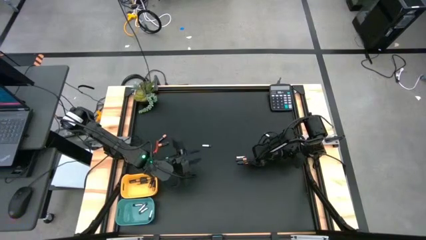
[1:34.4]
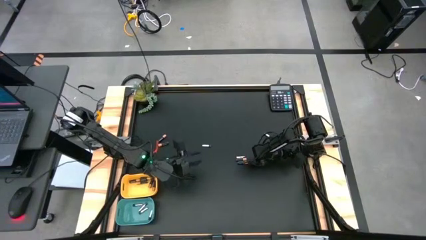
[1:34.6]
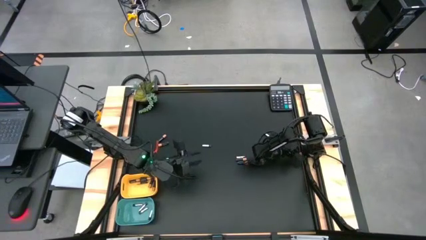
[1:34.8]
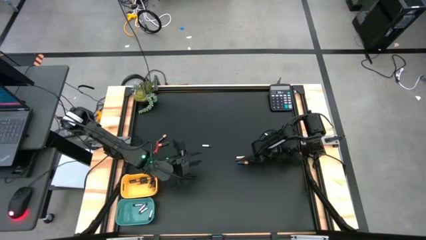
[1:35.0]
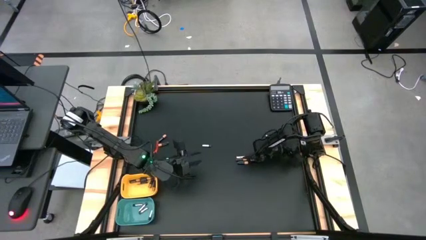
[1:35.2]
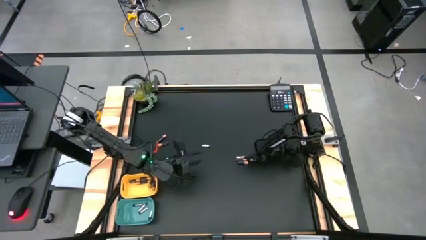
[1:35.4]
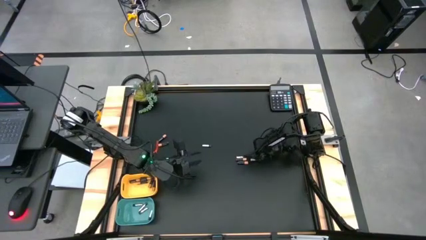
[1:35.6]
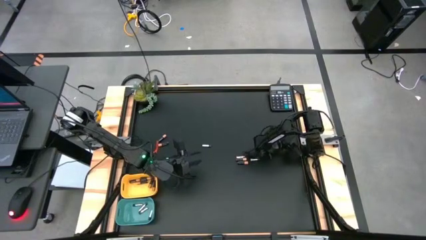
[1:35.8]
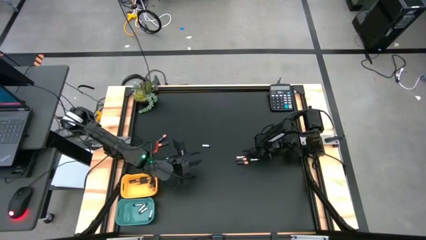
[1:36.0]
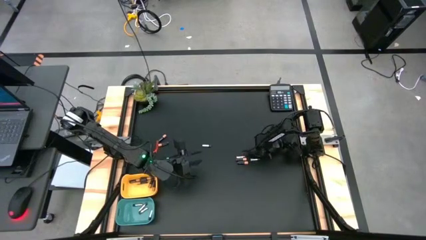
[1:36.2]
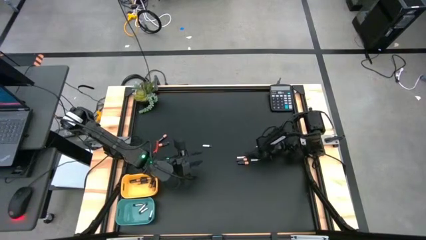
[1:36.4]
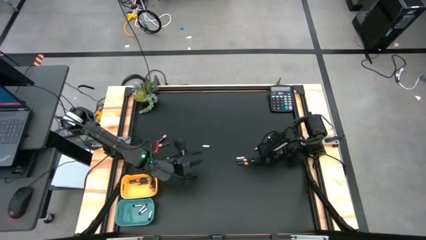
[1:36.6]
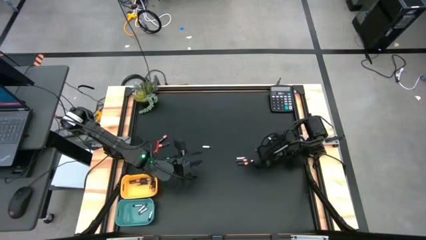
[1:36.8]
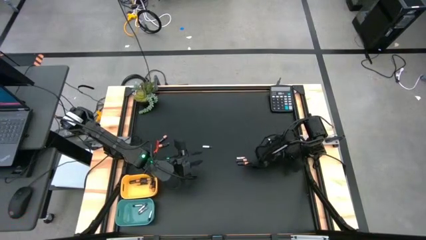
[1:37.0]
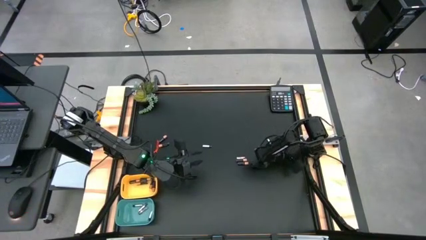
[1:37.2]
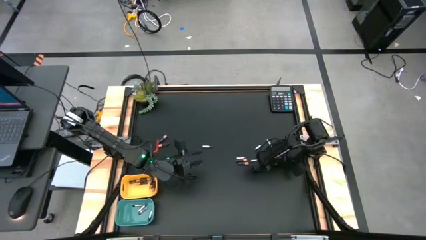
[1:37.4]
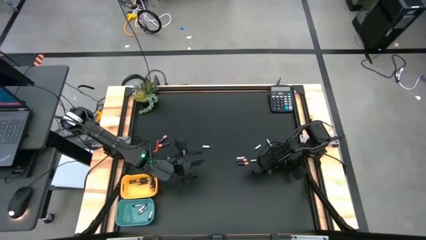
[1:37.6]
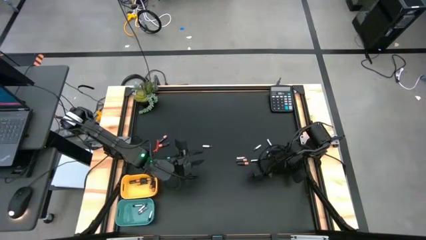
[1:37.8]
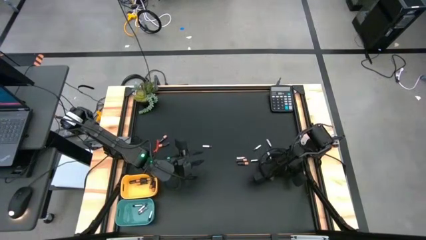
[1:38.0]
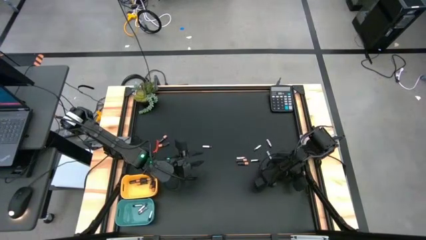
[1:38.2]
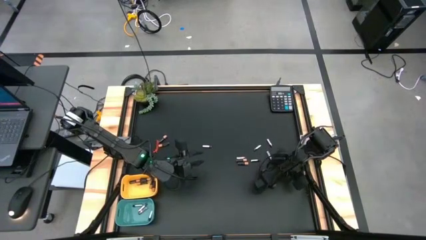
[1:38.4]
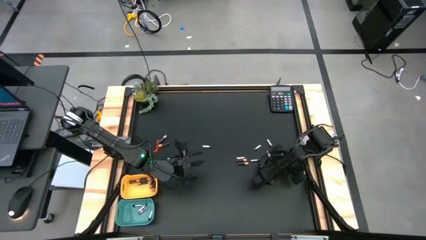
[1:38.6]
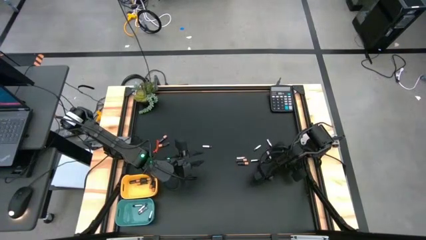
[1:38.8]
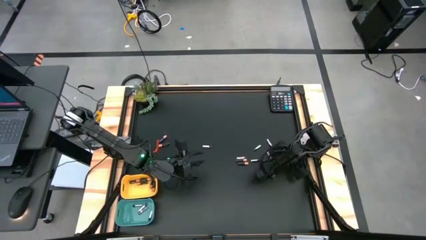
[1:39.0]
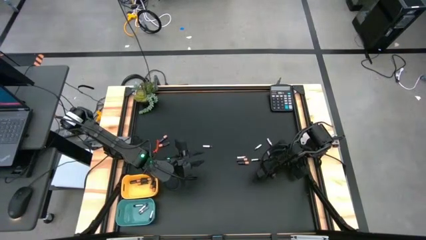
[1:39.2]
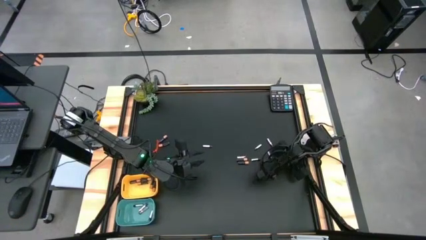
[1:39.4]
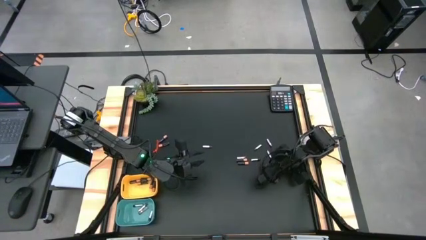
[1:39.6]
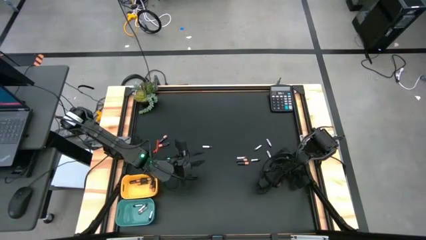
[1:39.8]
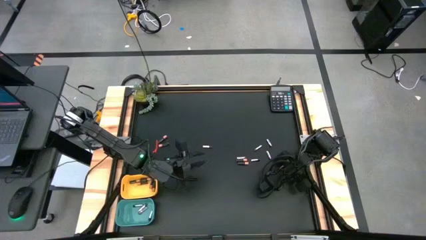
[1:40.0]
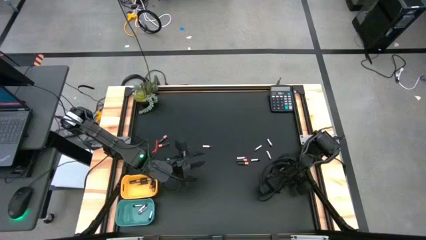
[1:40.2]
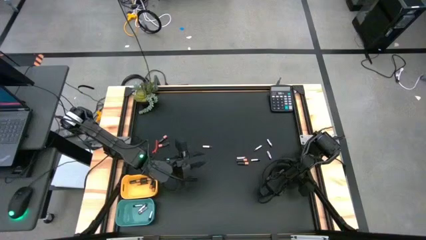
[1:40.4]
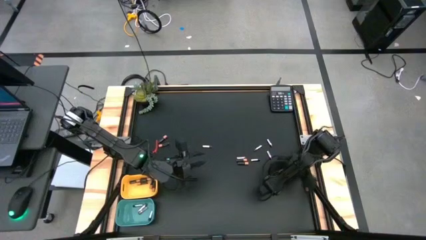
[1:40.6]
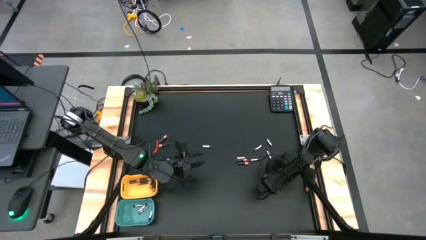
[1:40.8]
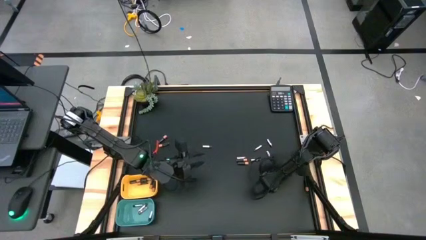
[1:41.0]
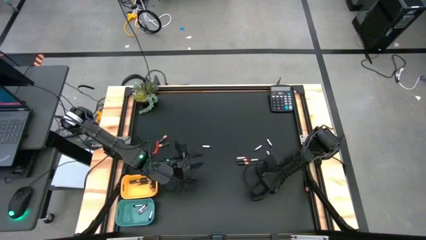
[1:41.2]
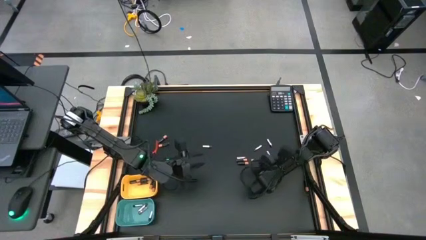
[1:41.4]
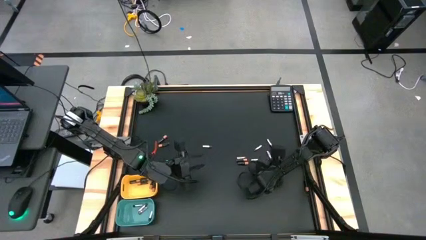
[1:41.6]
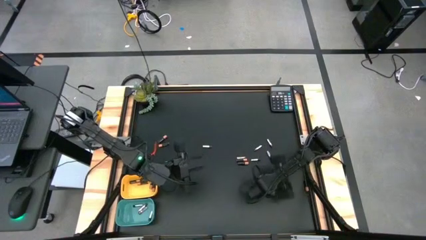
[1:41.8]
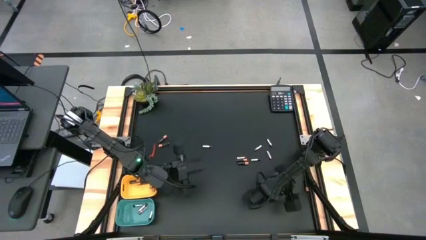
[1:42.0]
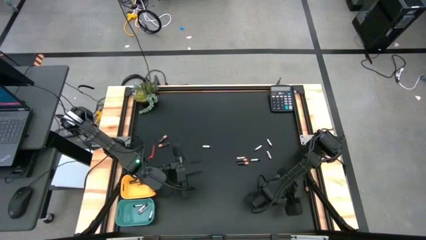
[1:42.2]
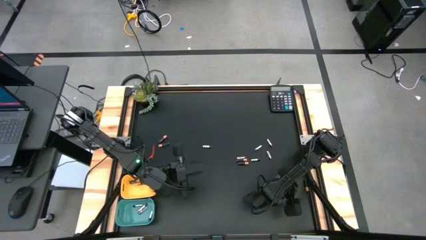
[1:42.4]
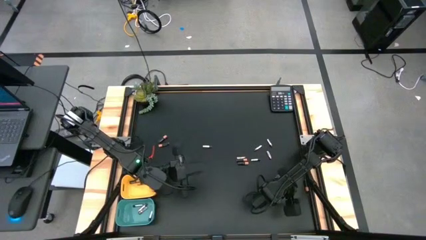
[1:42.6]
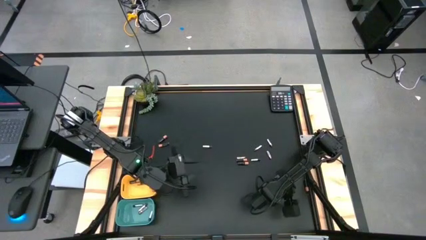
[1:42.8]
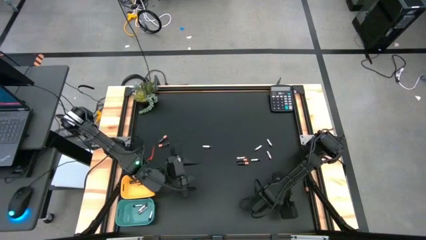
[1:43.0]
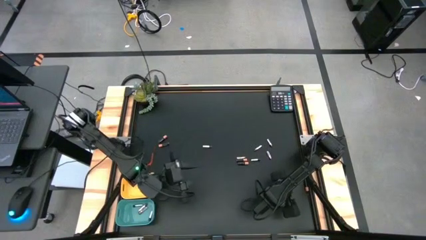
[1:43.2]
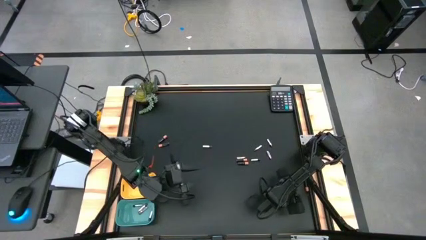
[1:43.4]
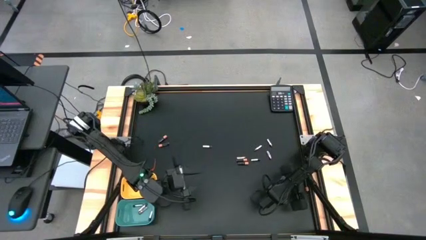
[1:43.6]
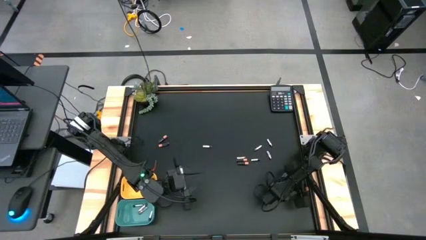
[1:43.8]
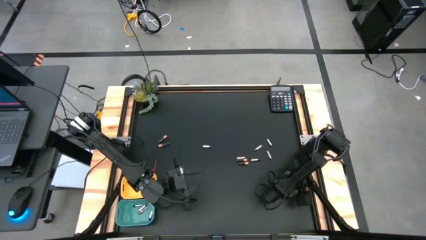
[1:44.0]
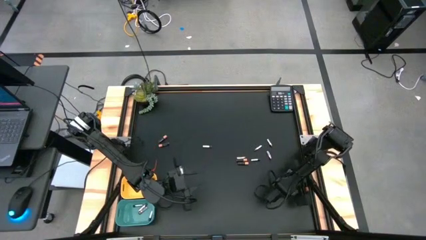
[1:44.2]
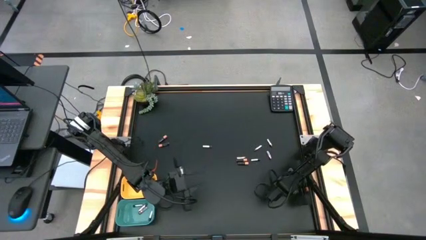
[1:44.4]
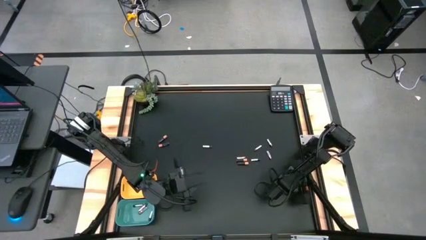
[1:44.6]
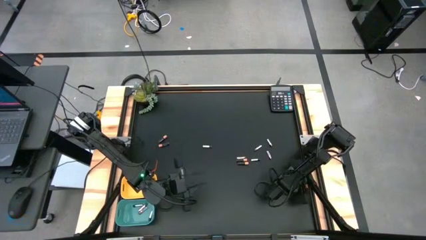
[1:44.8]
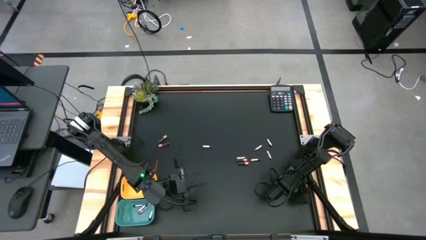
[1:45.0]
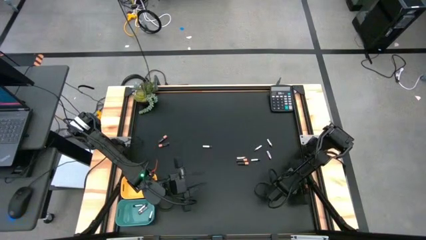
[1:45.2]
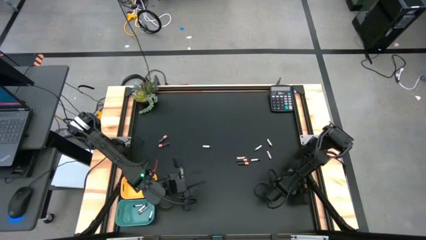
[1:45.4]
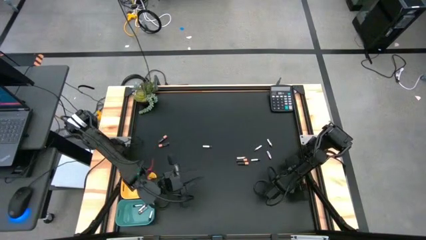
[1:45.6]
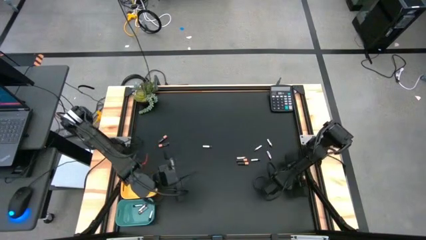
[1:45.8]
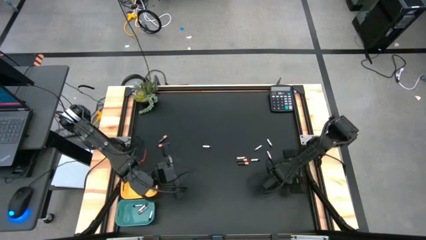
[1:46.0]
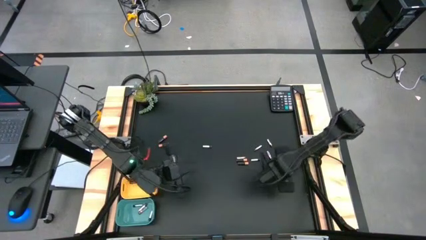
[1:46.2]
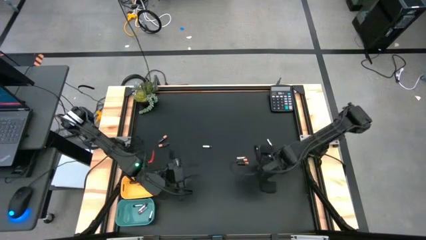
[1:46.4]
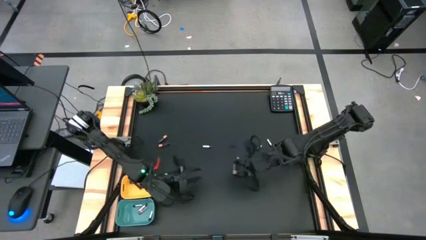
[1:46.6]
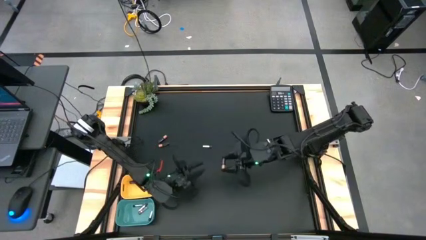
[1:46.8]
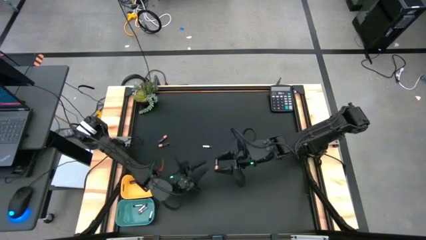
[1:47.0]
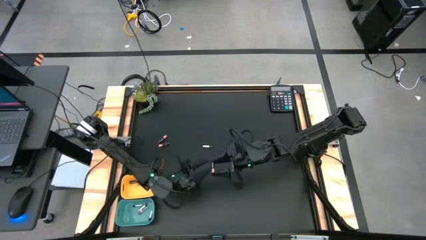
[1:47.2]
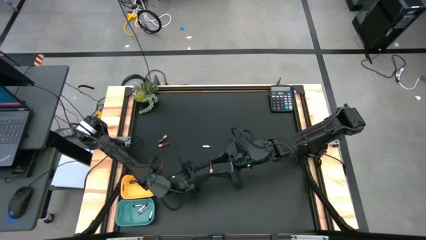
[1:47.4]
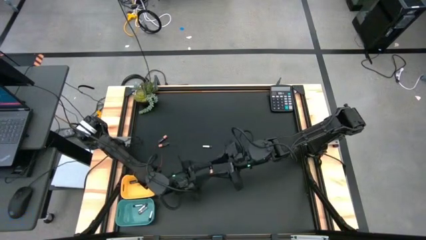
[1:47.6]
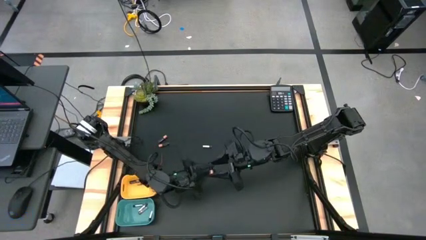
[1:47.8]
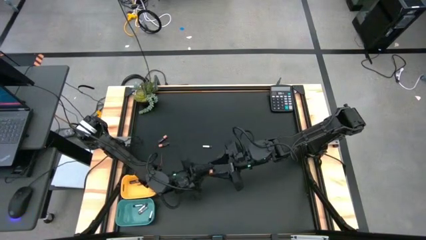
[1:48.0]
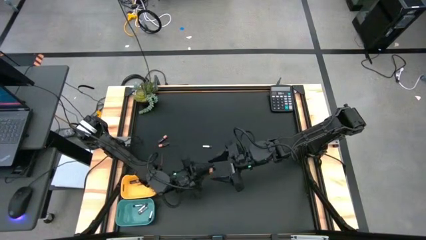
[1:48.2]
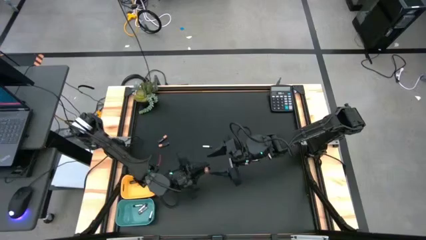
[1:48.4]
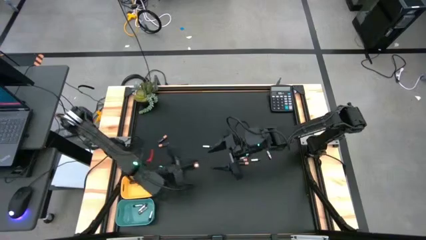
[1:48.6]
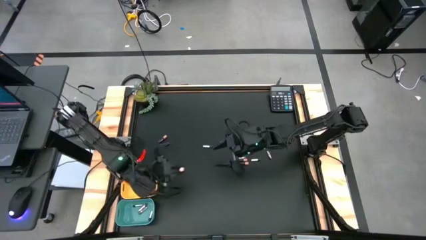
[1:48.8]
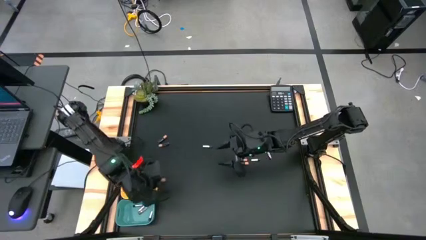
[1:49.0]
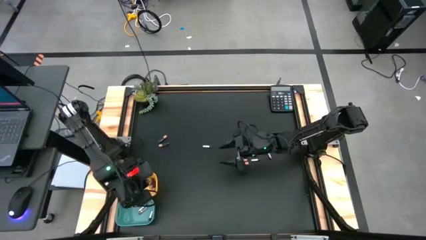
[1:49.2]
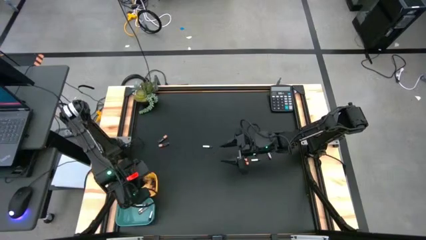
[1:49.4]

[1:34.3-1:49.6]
Task: Sort batteries
Put the black battery into the yellow bin

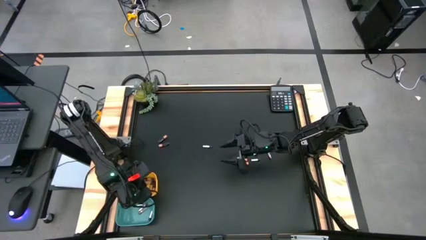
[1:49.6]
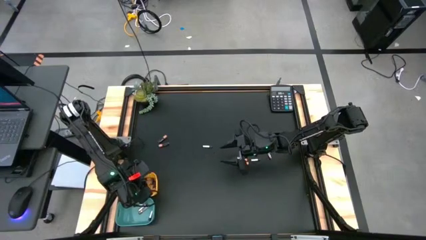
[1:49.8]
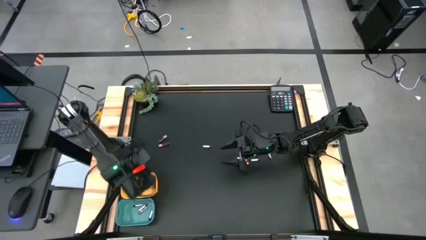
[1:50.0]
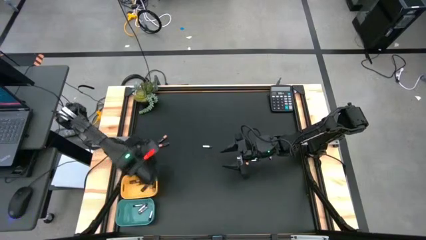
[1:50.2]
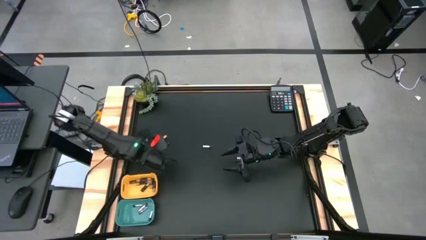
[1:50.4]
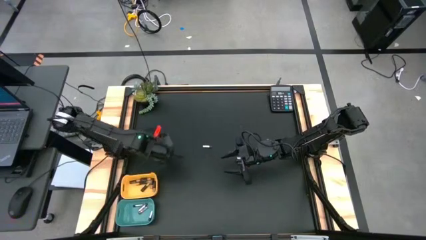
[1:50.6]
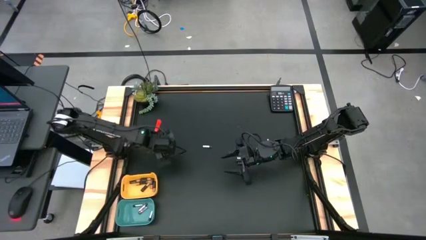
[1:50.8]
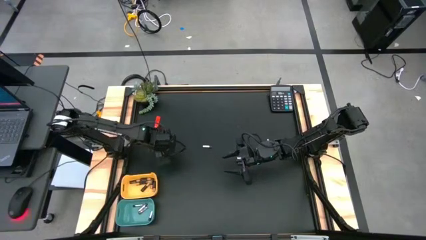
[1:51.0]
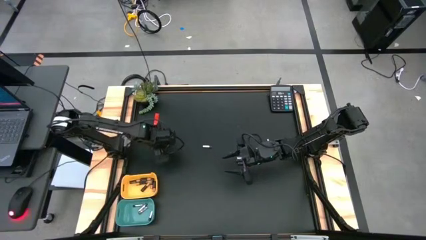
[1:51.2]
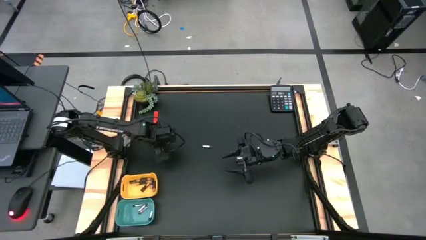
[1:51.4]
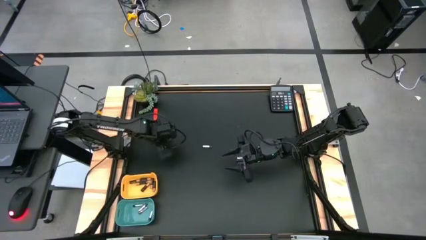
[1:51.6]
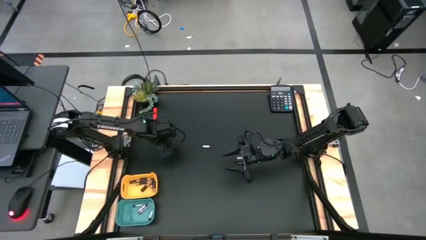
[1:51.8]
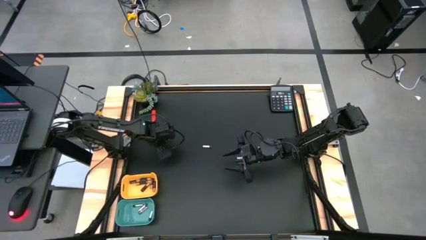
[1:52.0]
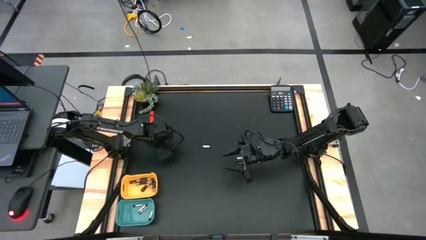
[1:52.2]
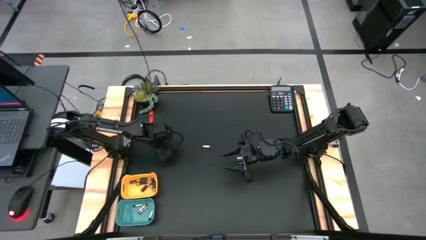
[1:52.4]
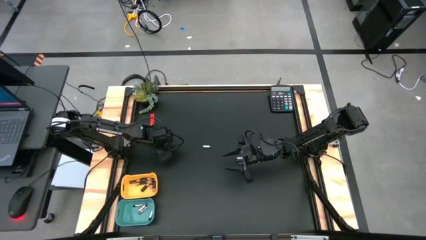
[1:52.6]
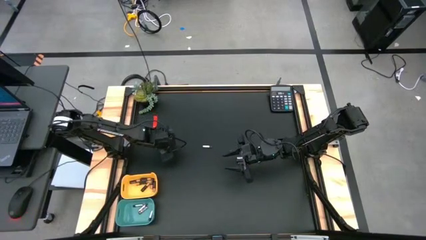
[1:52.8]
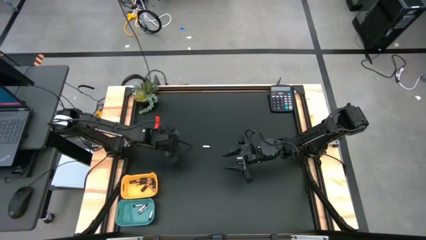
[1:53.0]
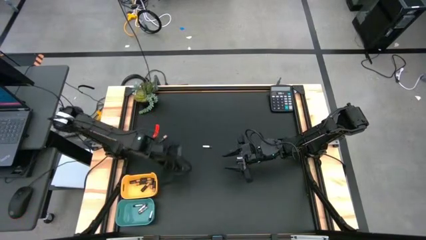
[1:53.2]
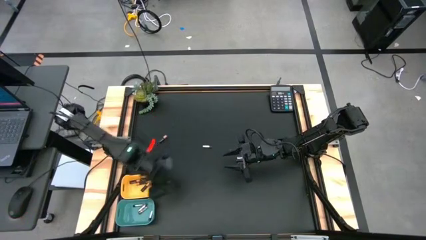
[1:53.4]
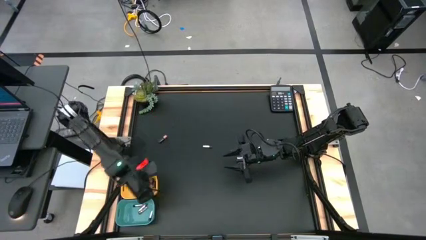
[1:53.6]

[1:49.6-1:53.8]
Put the black battery into the yellow bin
